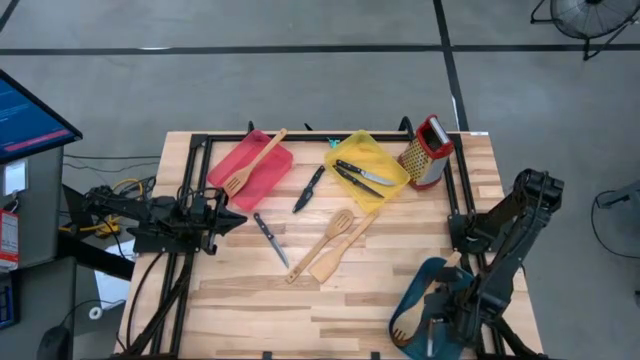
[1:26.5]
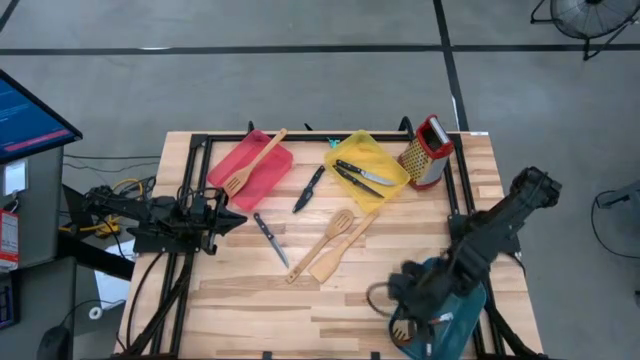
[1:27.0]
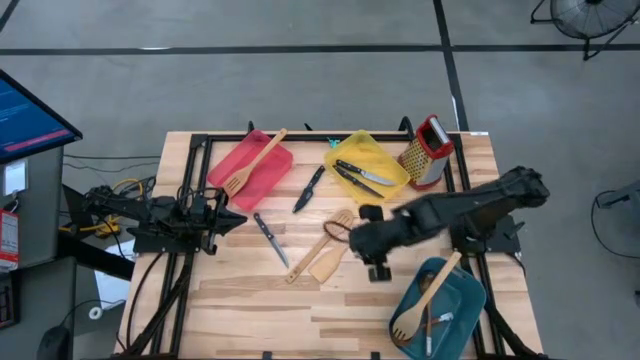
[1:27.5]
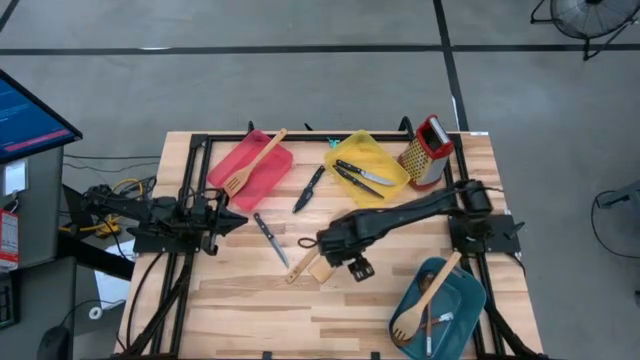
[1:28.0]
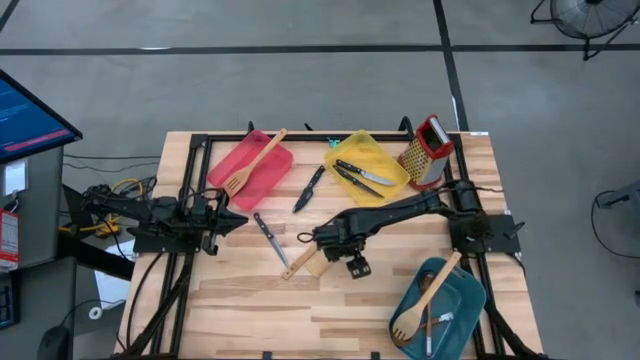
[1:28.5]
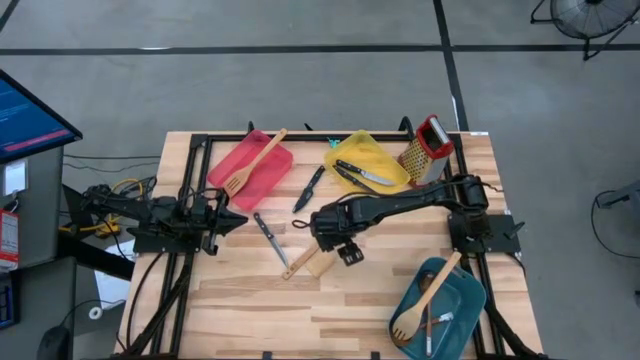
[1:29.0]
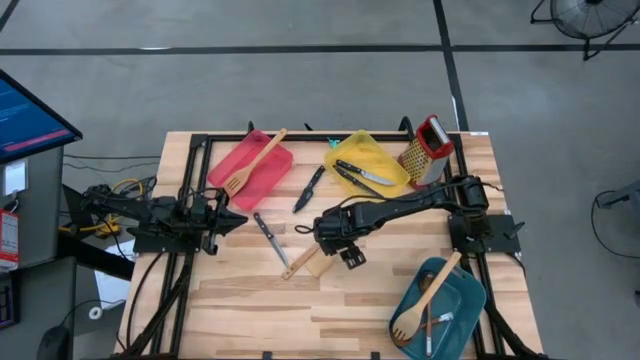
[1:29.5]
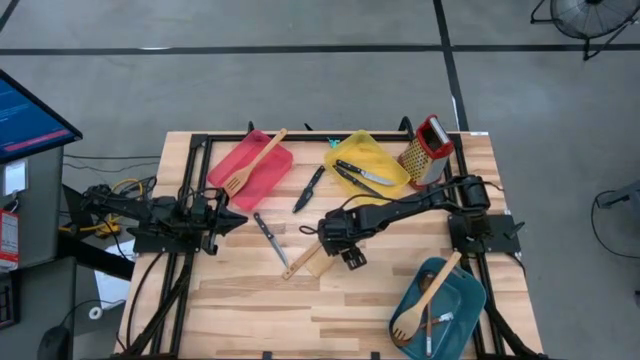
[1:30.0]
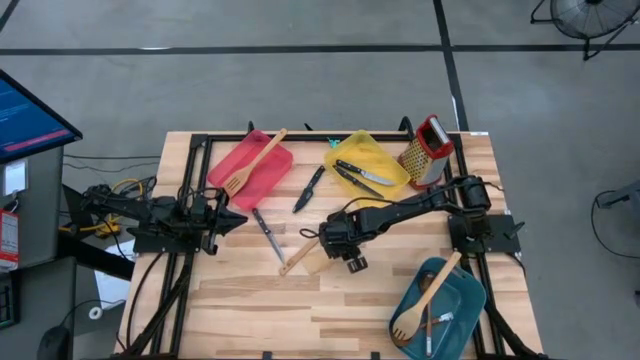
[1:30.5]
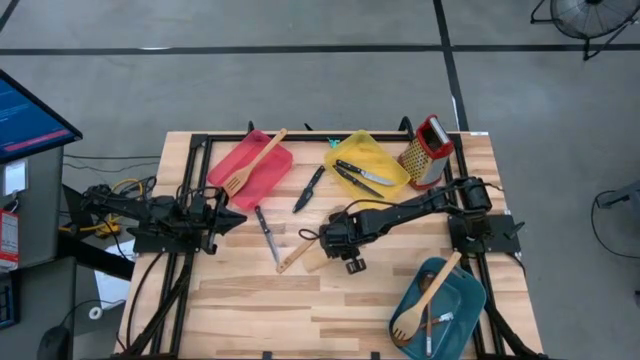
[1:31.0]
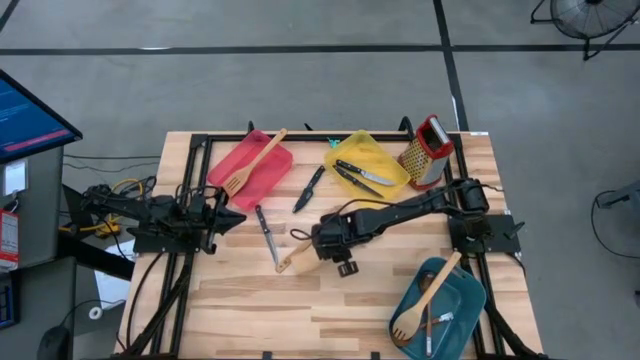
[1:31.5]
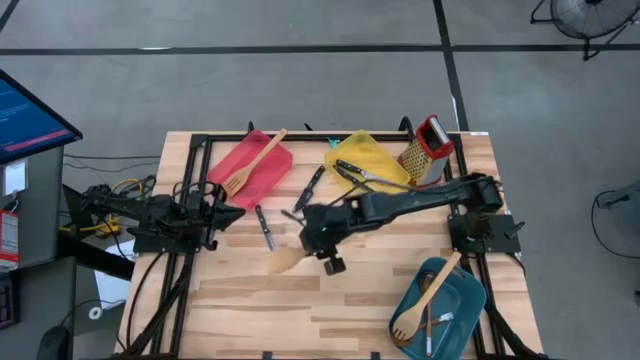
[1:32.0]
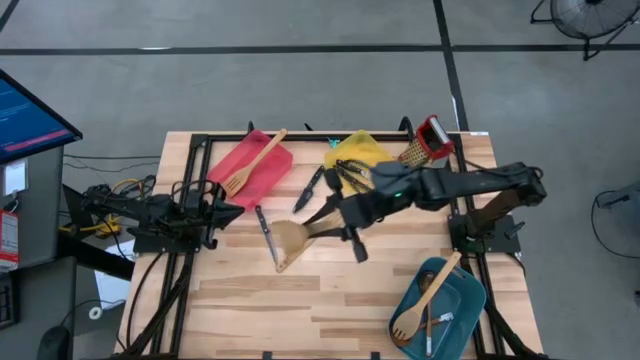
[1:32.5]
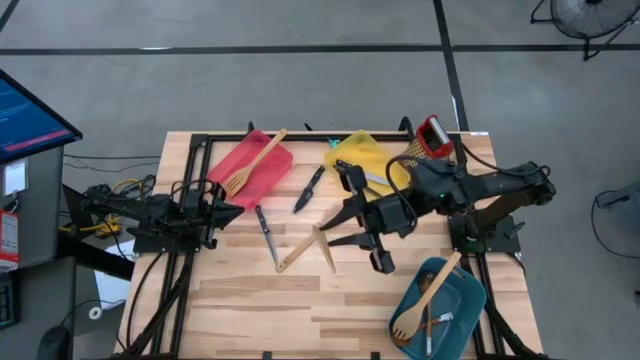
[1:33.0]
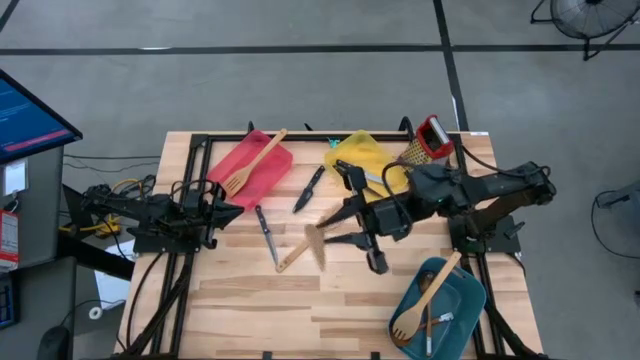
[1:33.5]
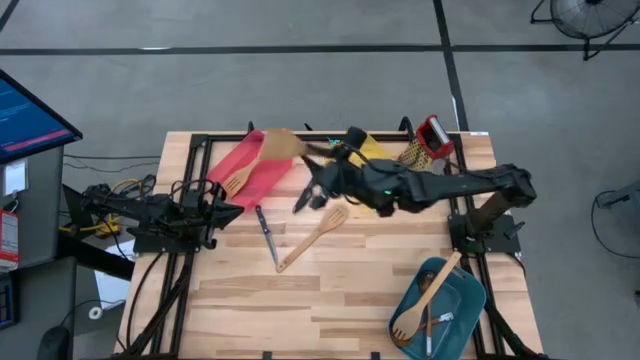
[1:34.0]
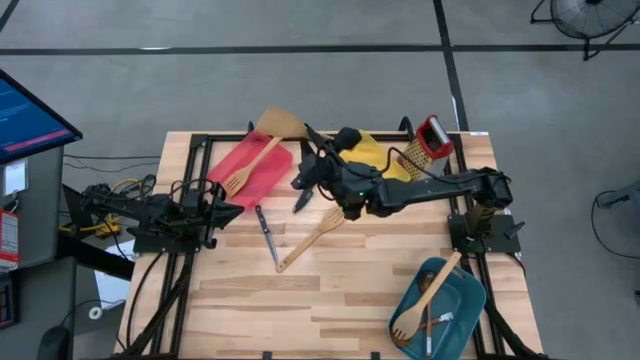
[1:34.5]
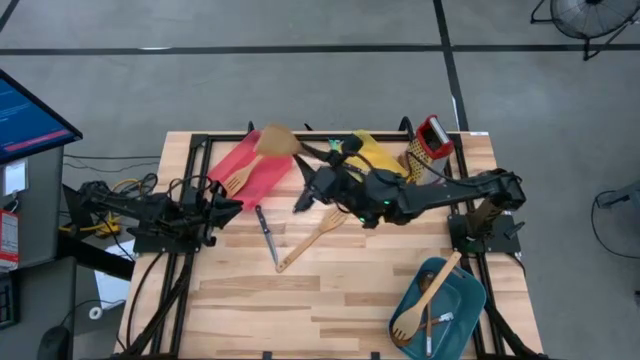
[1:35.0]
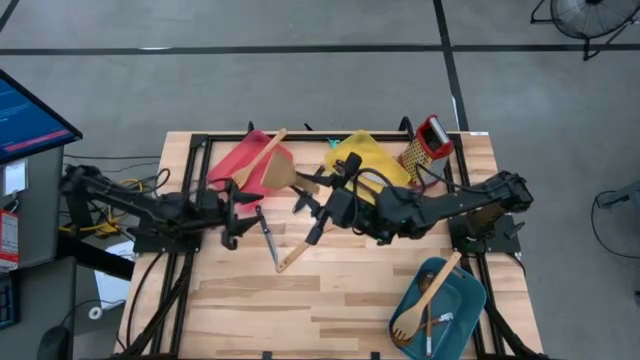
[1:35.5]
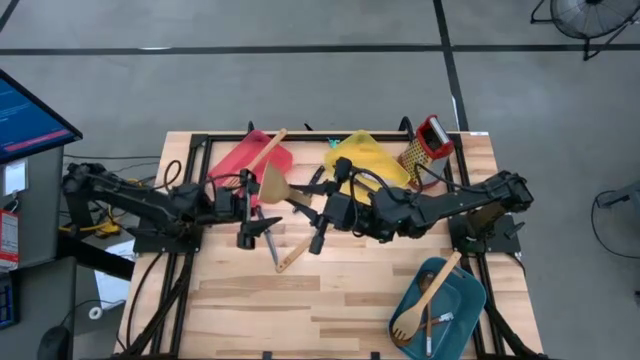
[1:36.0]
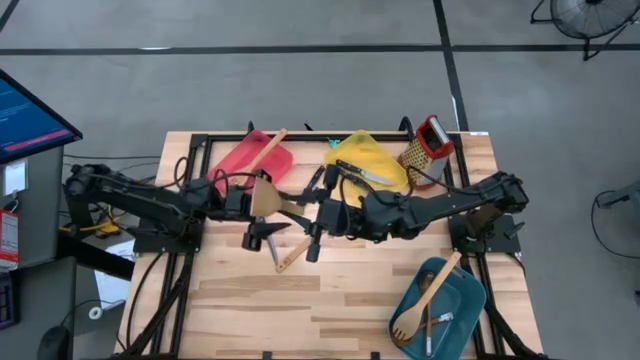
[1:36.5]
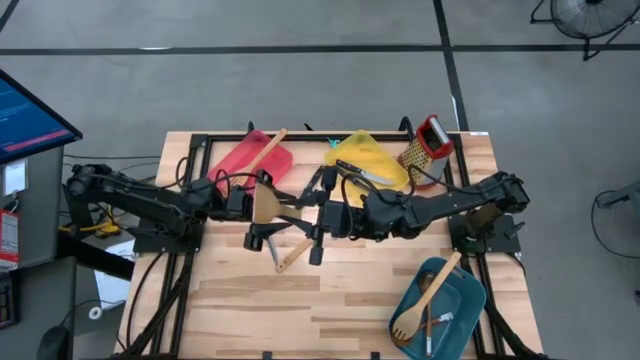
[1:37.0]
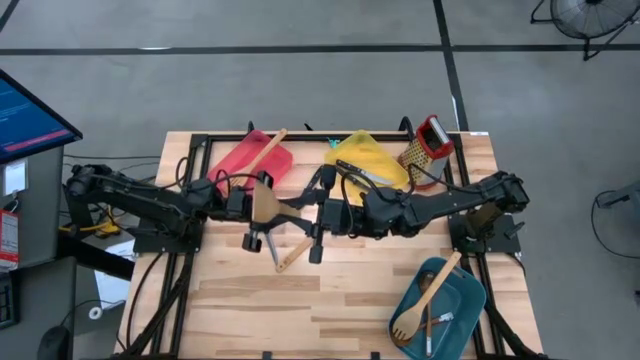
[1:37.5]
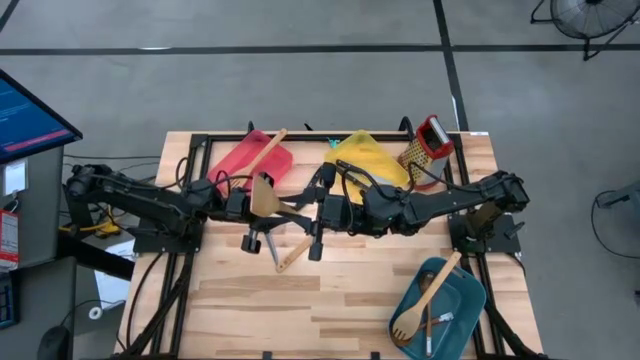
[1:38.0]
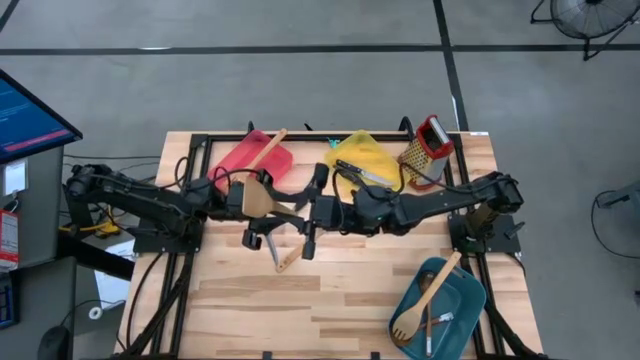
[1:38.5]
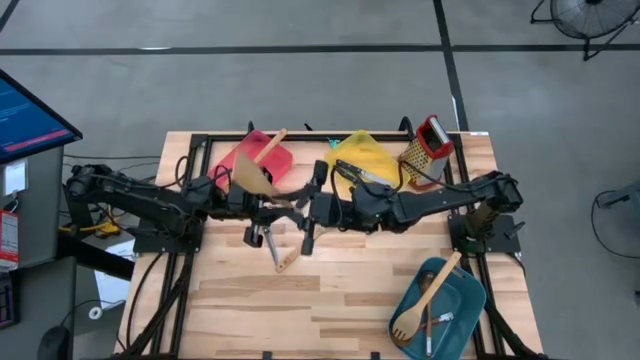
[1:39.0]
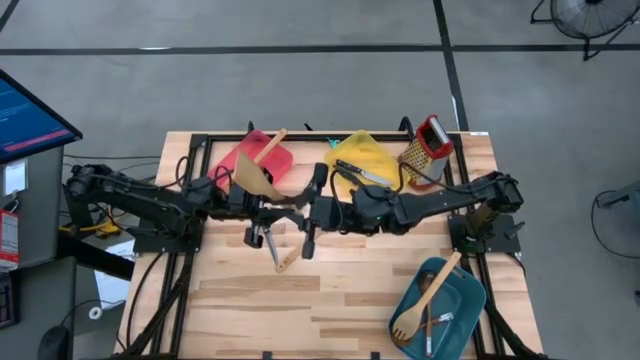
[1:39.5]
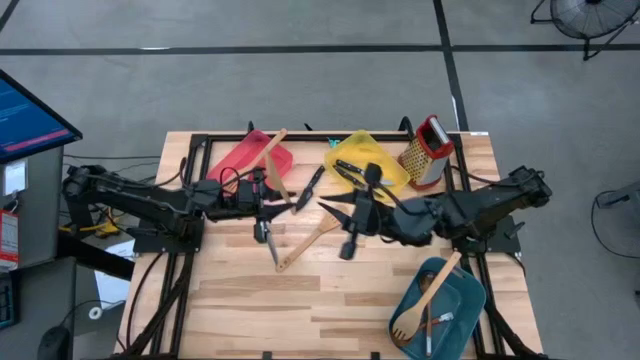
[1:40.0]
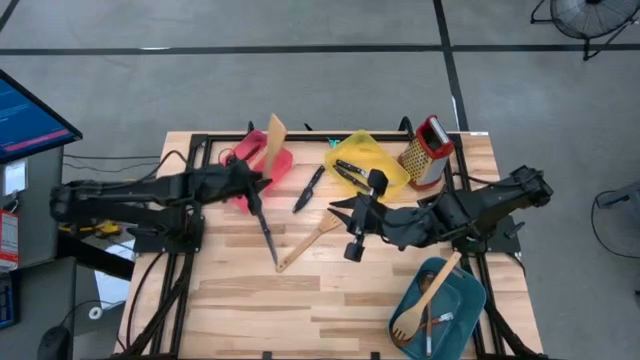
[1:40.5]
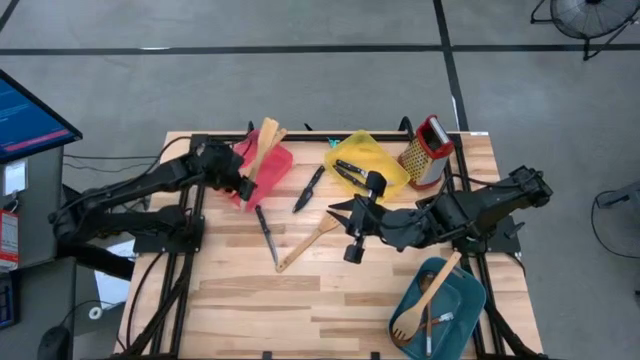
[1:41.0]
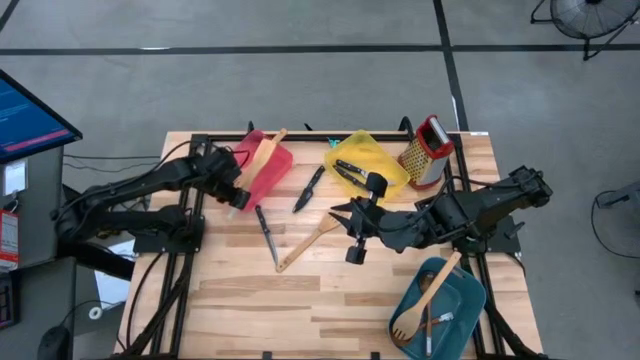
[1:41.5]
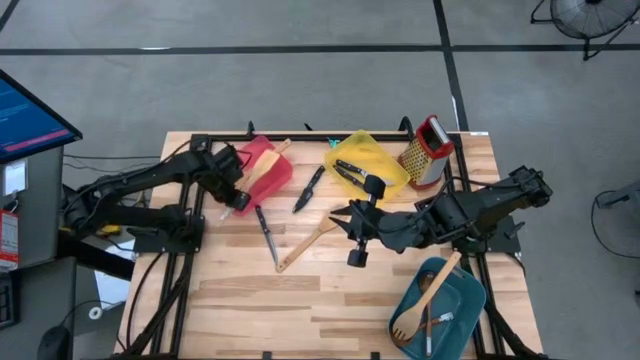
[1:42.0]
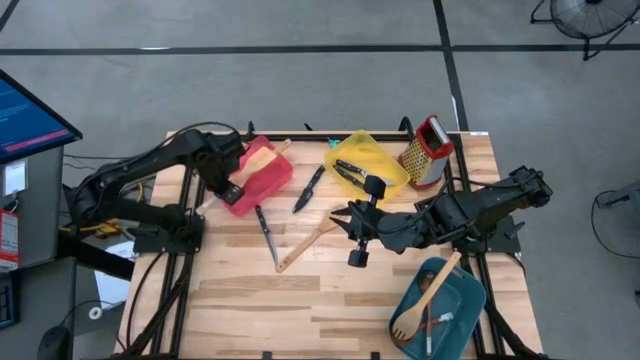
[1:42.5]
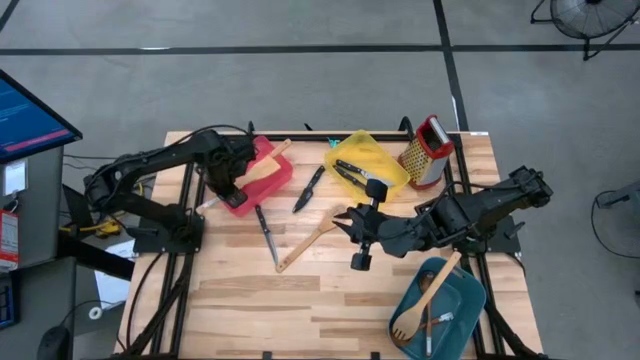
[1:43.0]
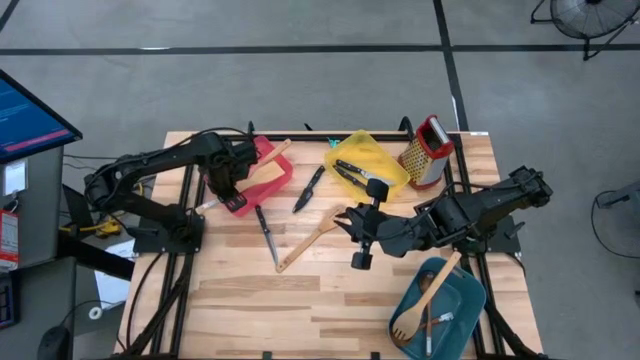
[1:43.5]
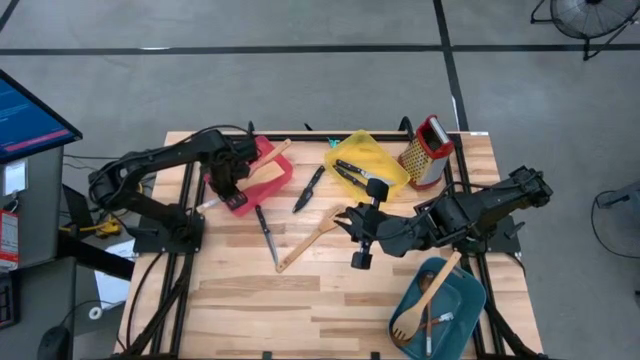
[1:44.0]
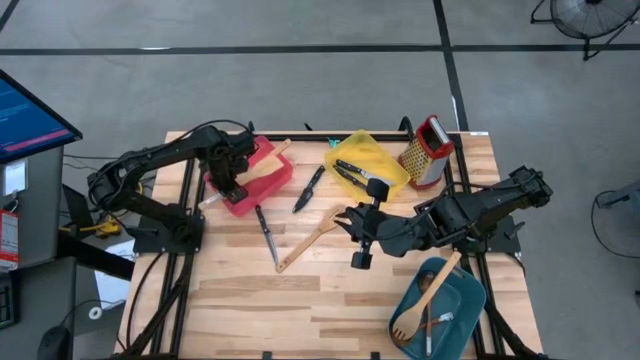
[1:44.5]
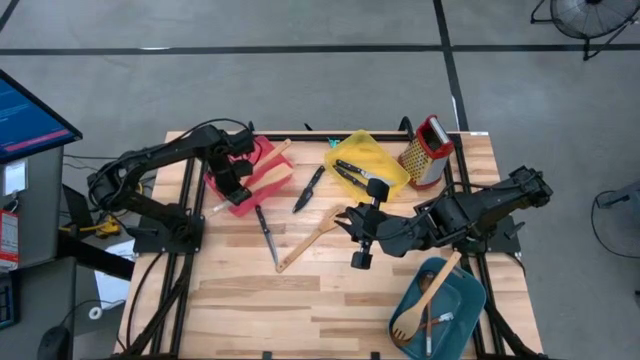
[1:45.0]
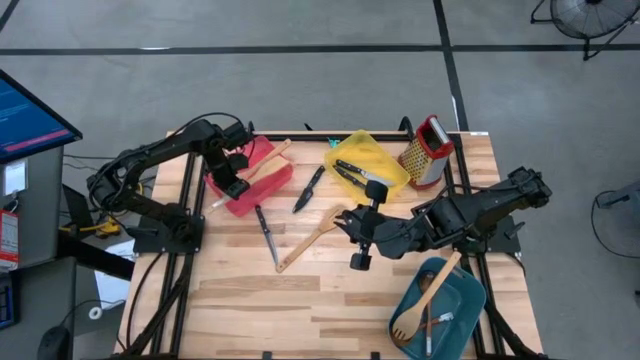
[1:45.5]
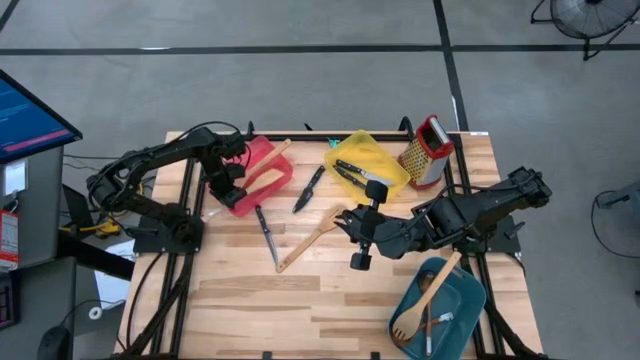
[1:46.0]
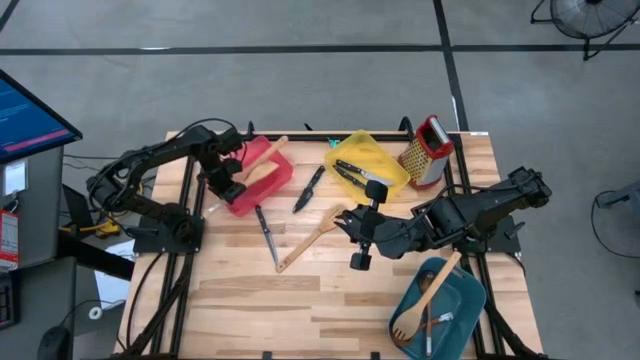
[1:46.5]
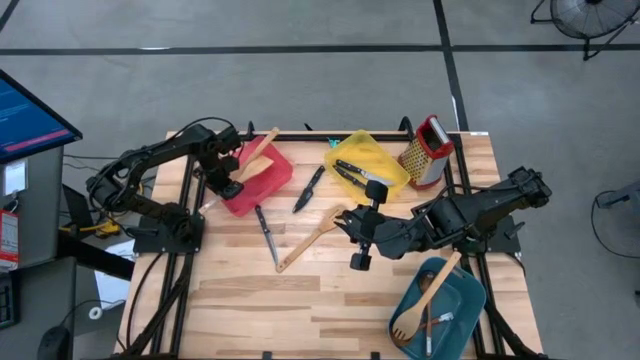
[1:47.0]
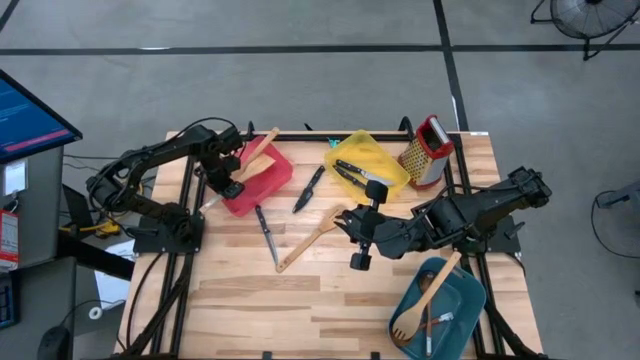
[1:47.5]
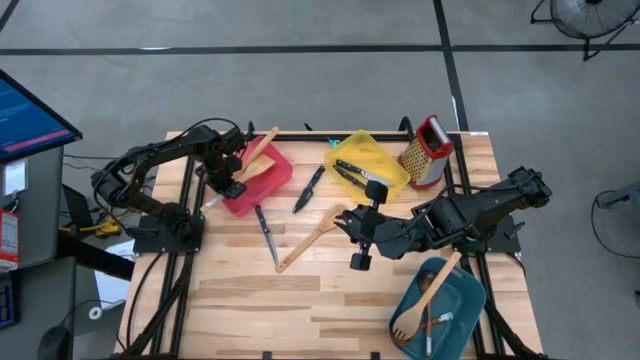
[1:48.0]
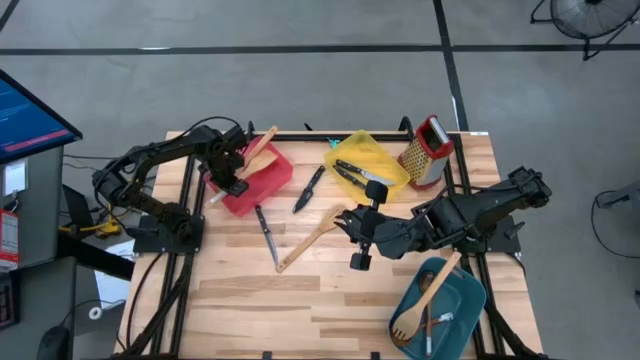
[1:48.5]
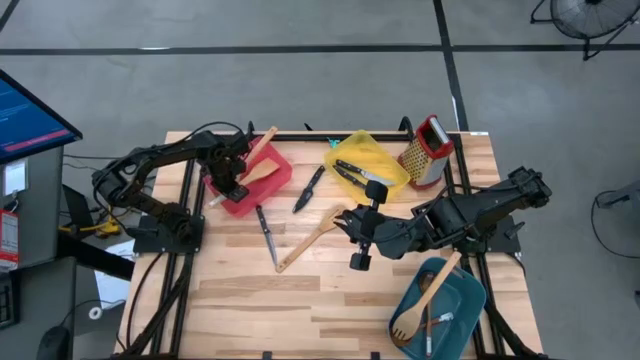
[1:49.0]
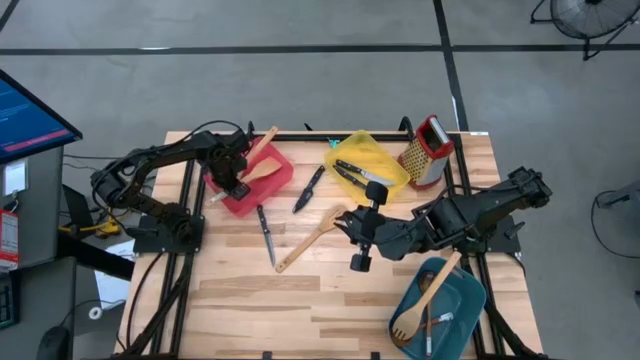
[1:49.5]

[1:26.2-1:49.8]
Task: Pick & Place Kitchen Items
Put the wooden spatula into the red bin
